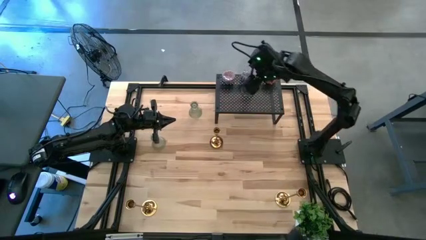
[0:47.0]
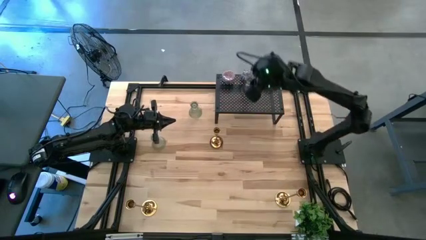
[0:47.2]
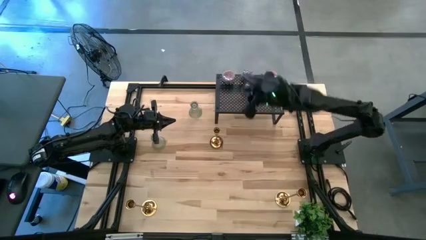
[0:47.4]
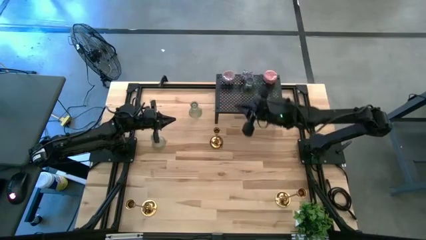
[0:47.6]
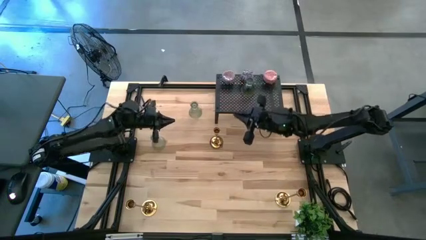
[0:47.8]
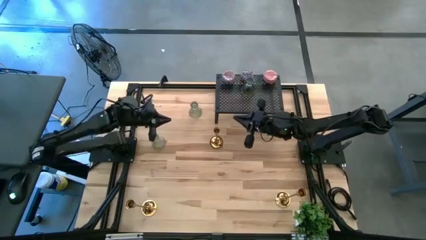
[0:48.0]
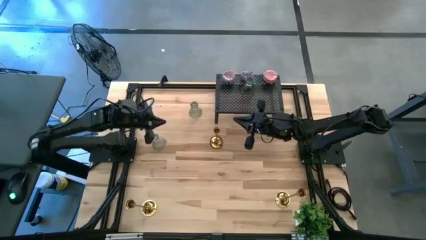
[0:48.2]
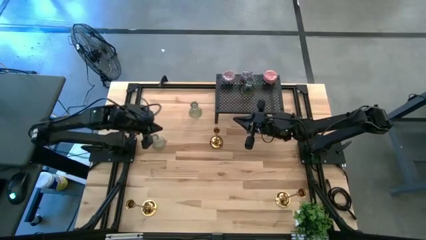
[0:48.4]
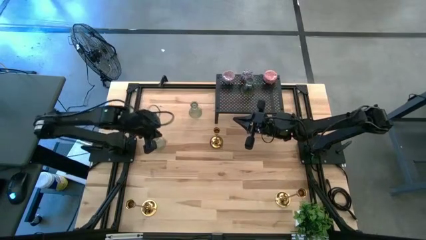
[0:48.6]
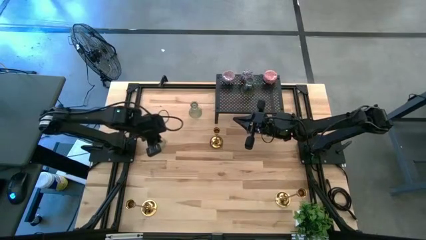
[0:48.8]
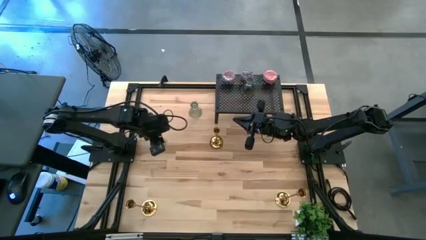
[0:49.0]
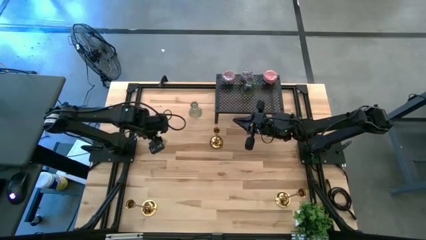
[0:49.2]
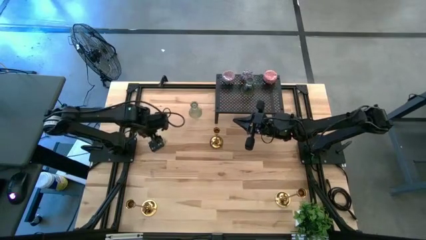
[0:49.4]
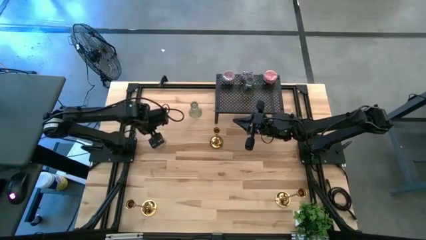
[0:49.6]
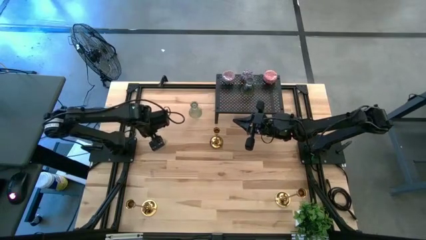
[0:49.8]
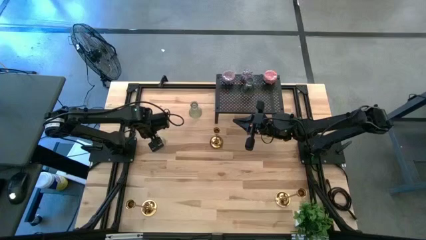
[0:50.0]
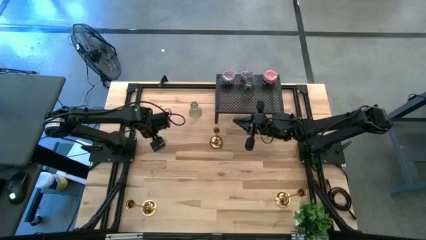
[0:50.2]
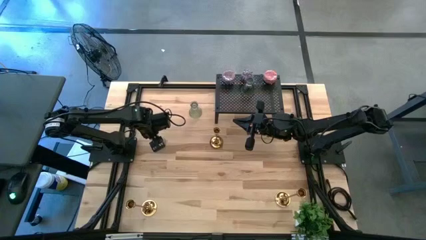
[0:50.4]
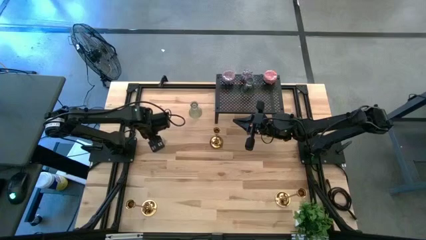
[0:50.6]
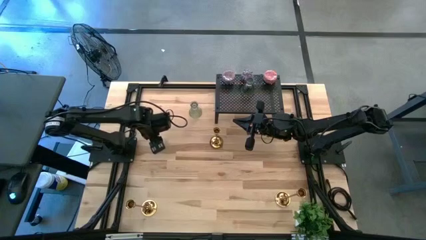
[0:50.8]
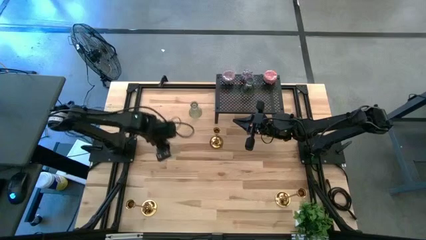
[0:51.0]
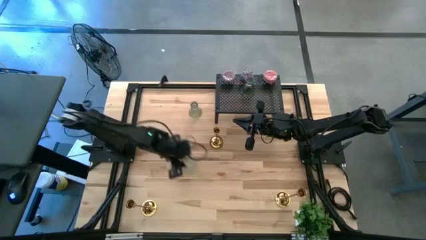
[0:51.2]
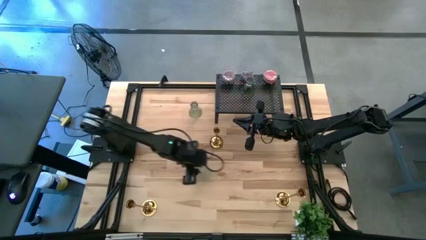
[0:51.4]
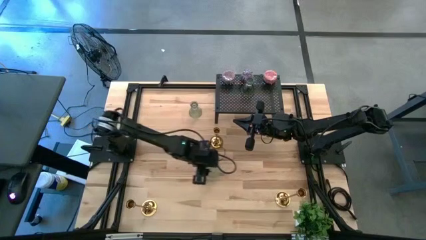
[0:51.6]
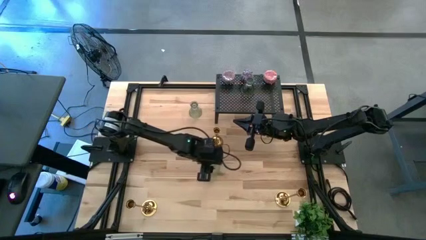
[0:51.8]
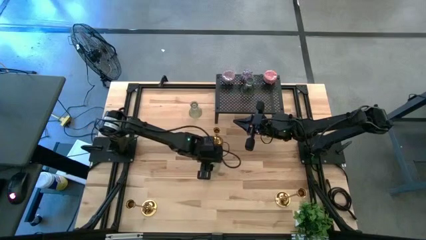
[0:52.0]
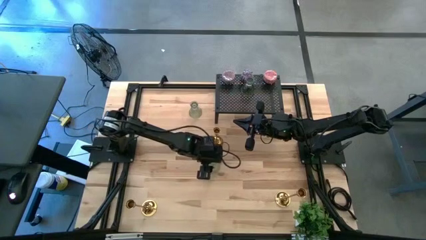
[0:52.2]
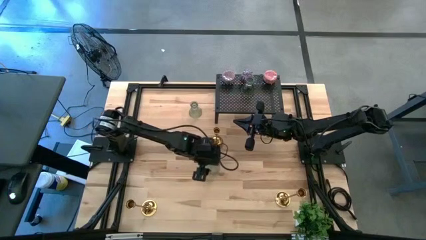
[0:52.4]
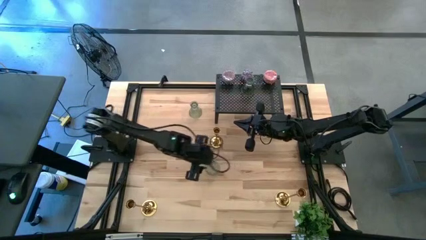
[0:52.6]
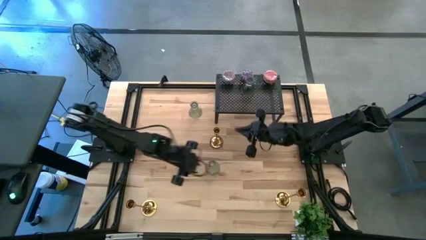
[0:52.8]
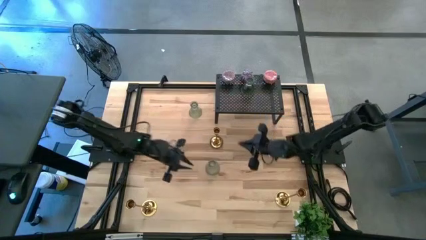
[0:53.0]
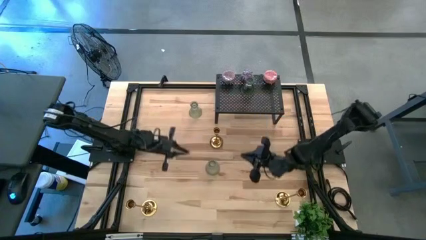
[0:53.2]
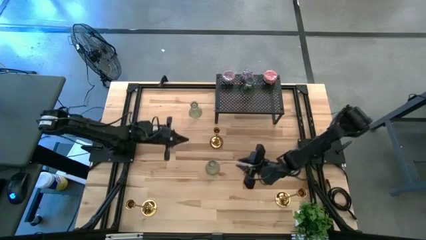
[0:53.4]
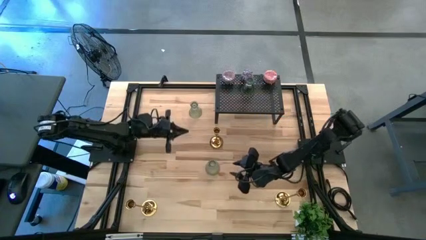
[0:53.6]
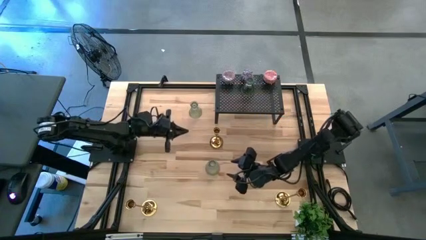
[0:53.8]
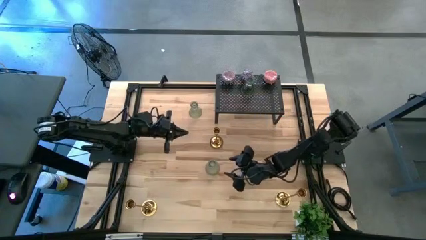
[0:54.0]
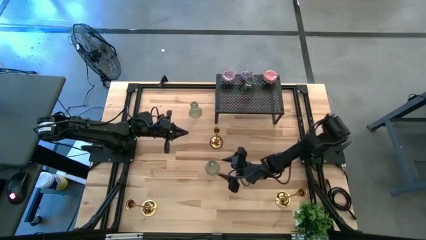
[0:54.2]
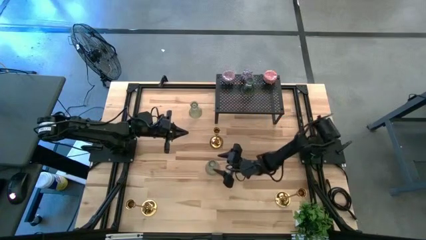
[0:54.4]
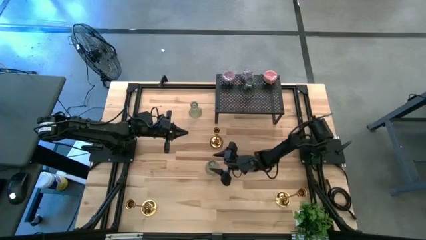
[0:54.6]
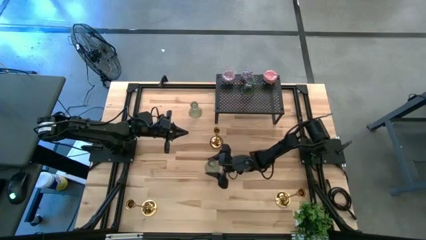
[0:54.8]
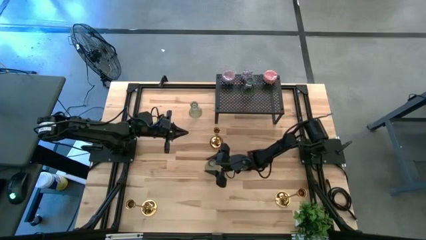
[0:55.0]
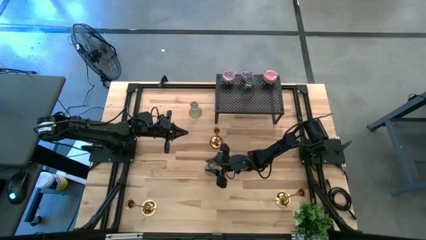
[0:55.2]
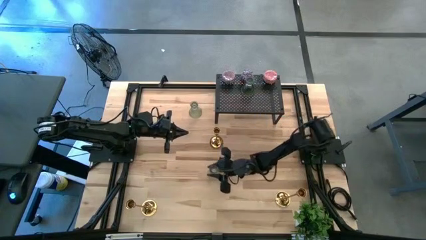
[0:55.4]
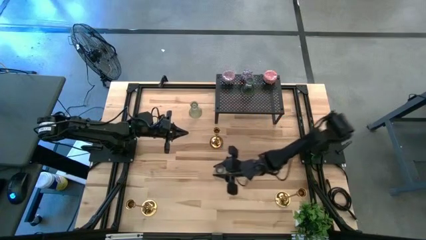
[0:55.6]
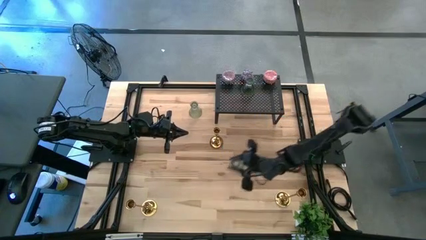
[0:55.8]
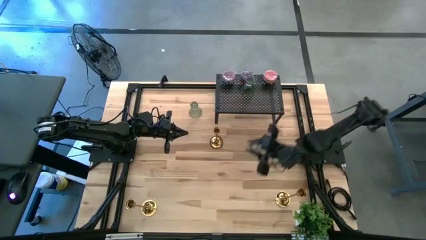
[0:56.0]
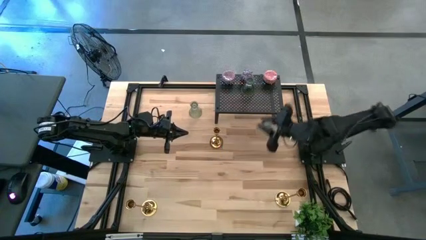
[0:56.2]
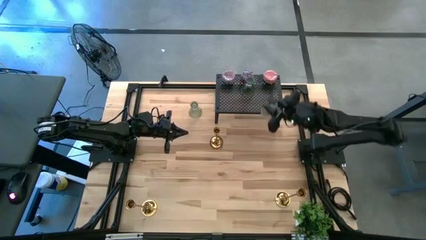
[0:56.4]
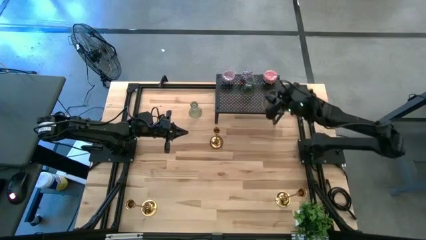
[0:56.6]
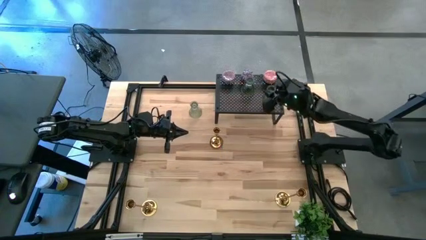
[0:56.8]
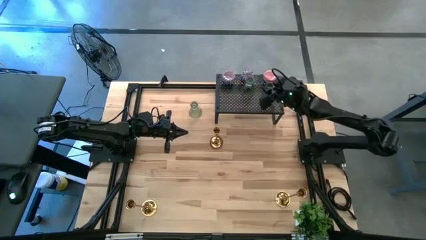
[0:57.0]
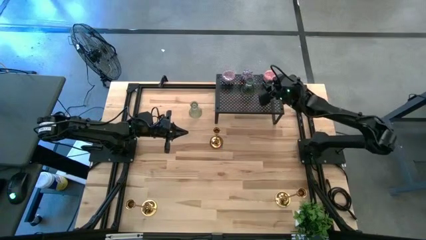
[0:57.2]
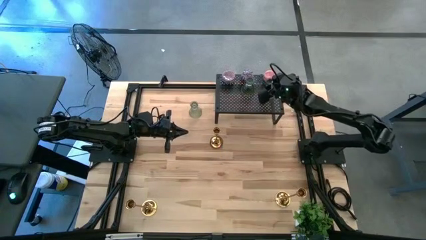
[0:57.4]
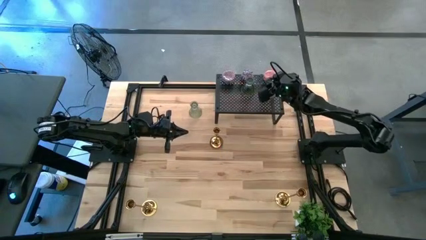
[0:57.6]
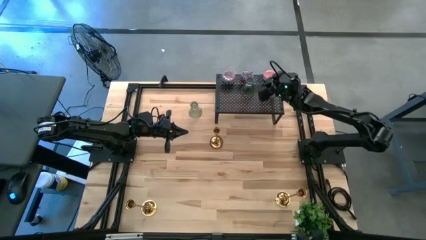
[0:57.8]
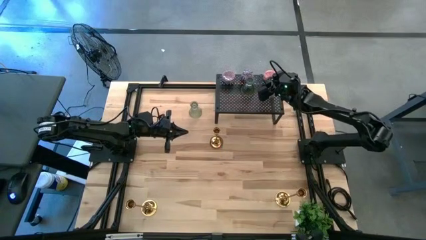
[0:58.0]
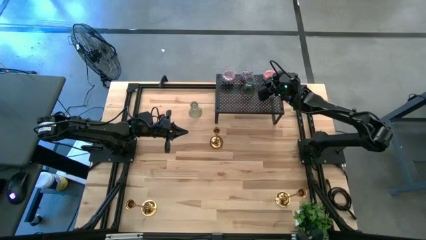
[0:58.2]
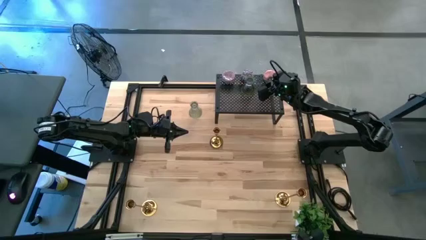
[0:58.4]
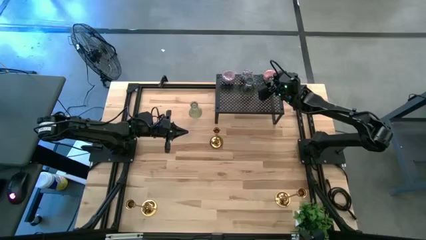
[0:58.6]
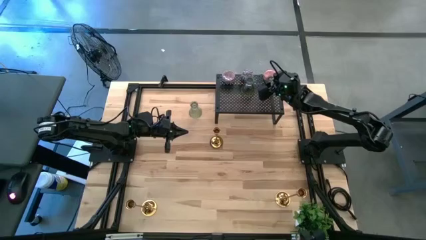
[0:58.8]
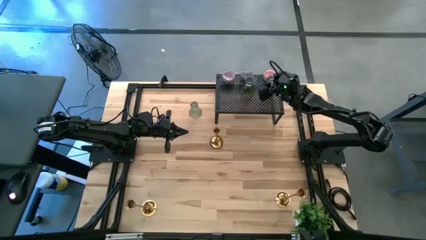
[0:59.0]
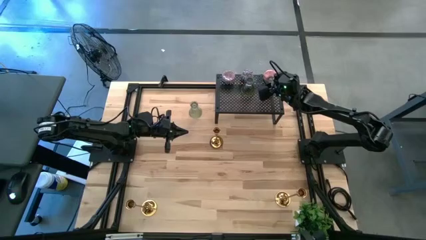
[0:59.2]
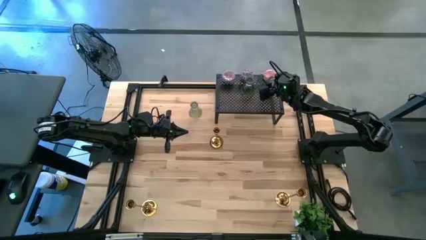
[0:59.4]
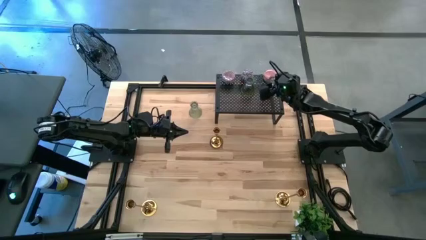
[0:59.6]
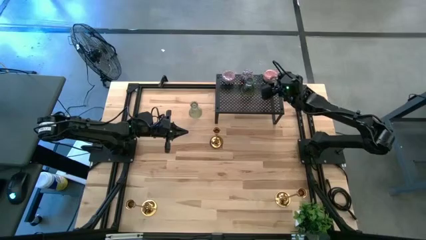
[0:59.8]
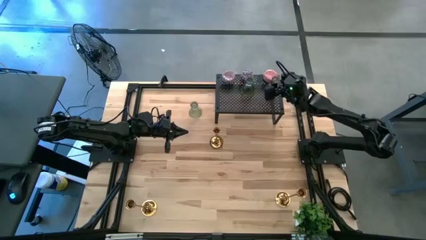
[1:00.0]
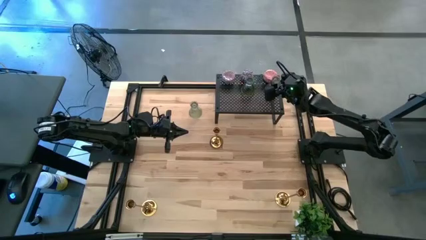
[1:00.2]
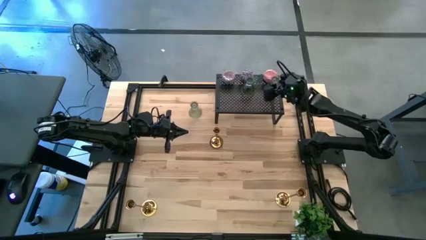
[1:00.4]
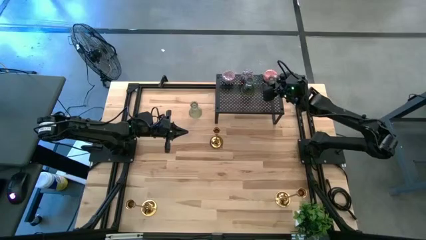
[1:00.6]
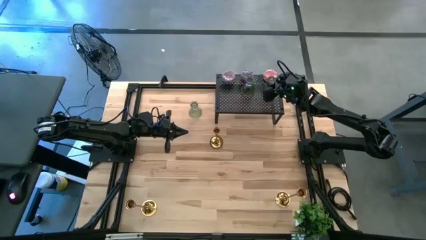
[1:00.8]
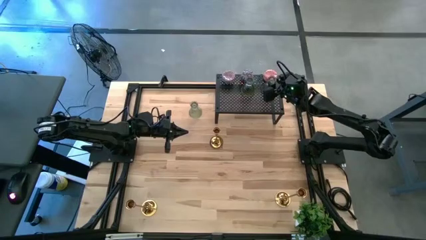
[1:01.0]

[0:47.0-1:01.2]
Task: Pick & Place candle stick holders
Put the bottom glass candle holders on the shelf

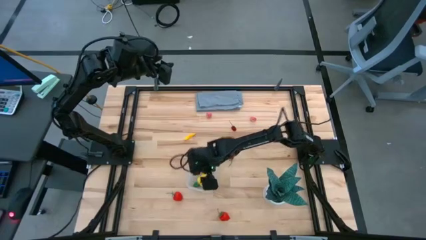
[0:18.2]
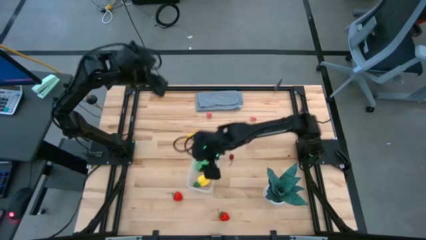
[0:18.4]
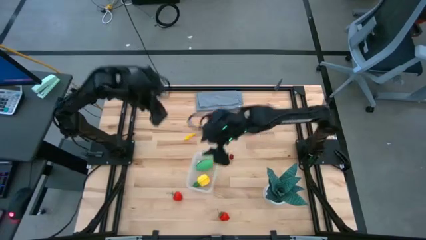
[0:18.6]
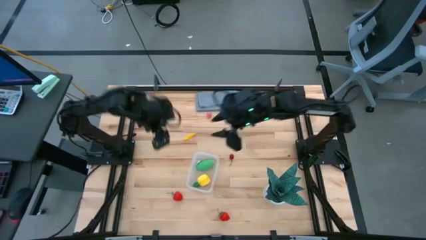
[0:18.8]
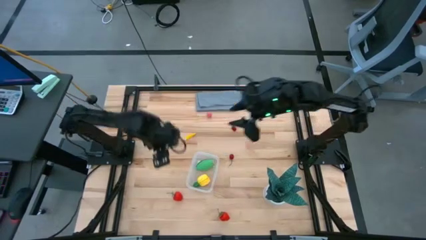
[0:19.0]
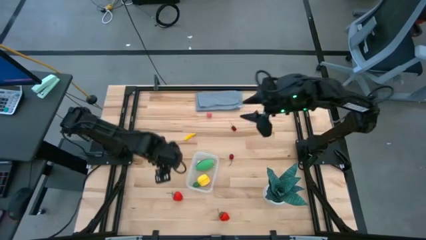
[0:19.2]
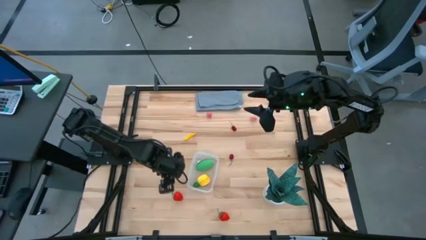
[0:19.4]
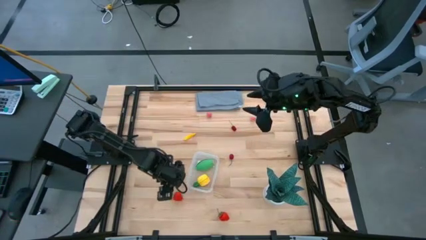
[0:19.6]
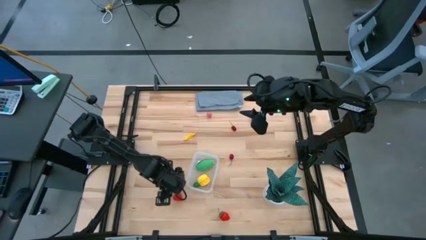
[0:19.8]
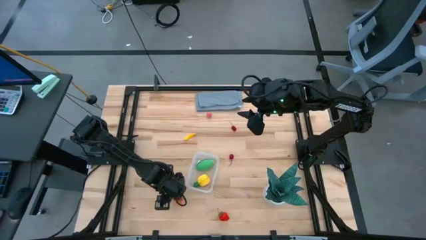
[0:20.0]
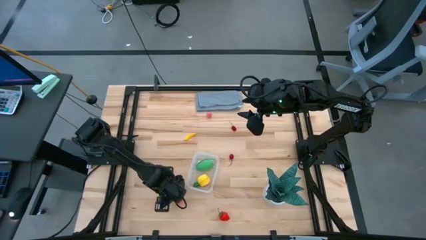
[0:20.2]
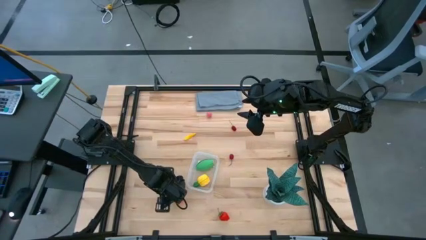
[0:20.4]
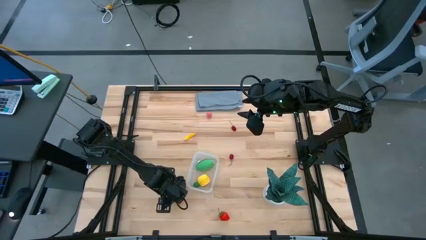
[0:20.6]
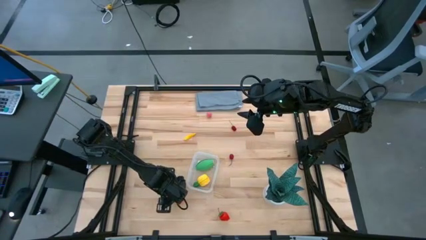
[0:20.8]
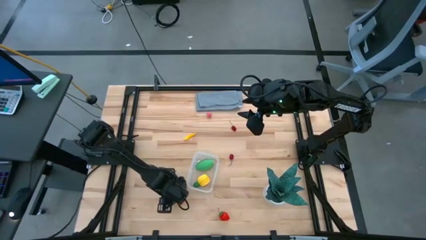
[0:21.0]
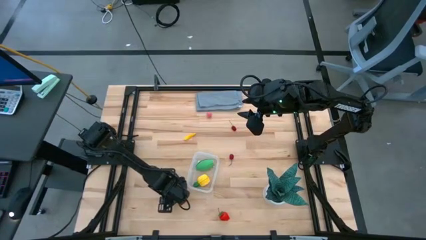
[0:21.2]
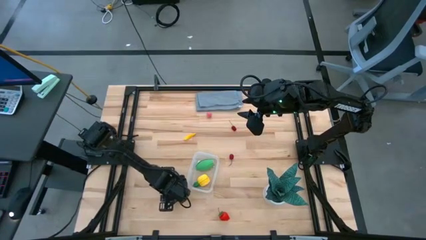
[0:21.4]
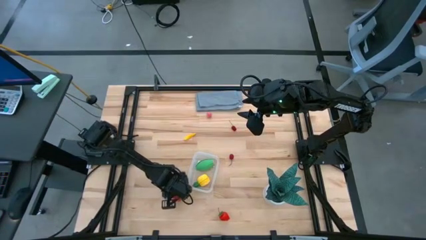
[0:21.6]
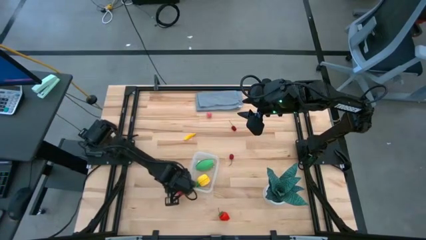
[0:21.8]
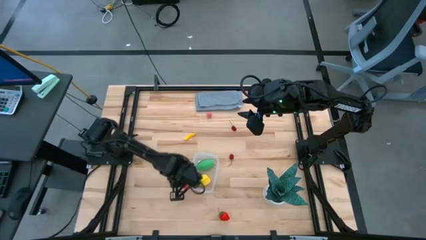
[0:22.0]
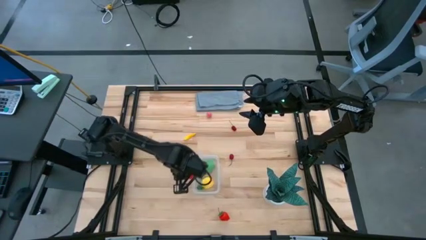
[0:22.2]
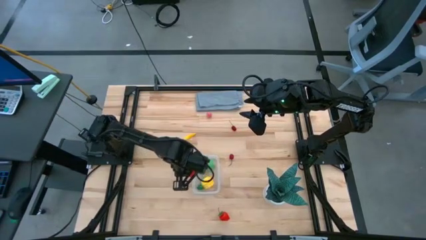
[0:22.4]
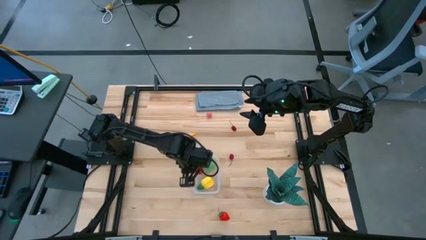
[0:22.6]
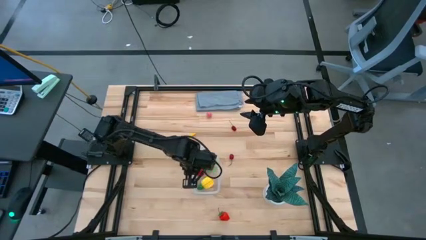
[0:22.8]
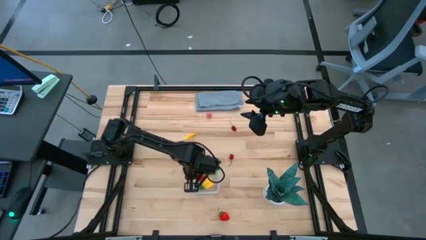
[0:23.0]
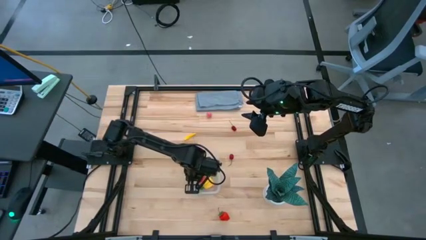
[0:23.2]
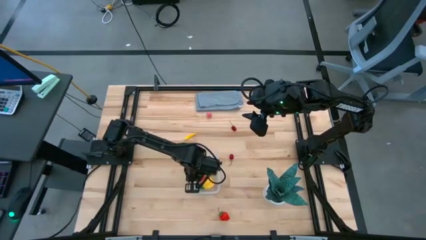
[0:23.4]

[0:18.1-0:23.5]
Task: Pick and placing Produce into tupperware
Put the top strawberry into the transparent bin
